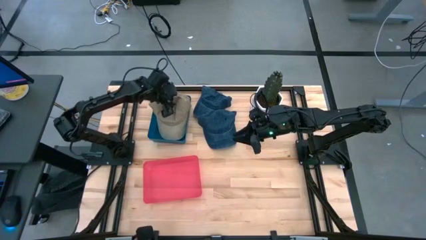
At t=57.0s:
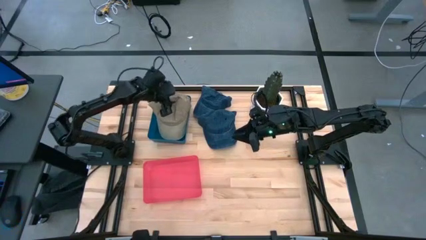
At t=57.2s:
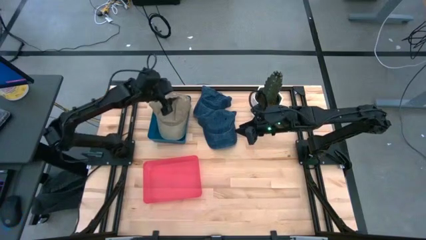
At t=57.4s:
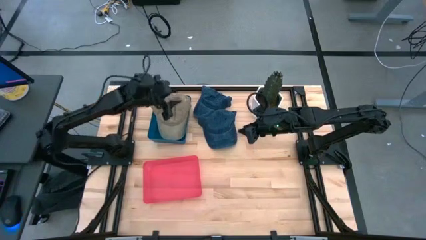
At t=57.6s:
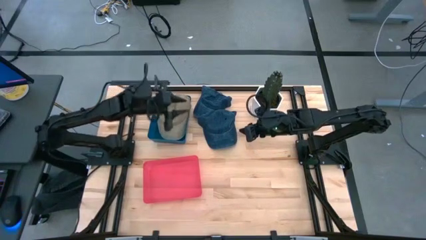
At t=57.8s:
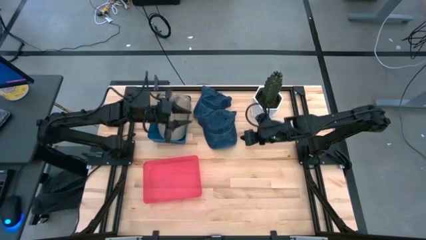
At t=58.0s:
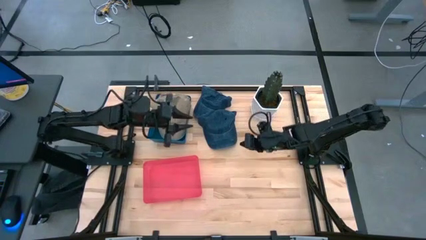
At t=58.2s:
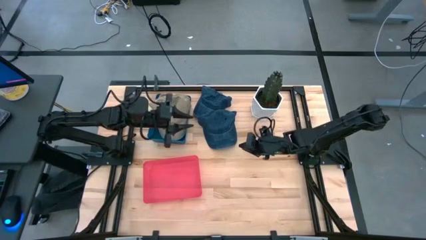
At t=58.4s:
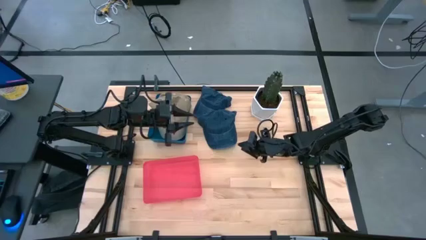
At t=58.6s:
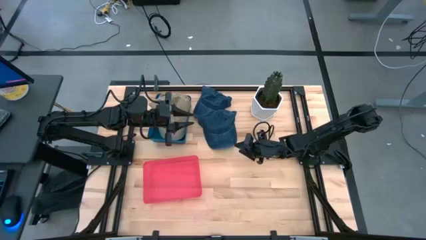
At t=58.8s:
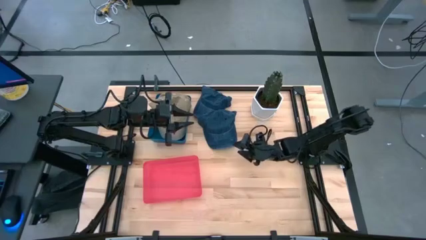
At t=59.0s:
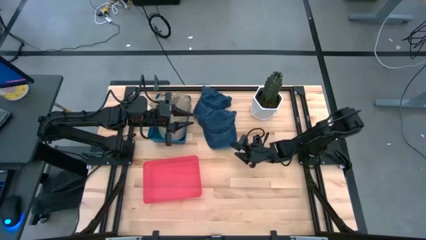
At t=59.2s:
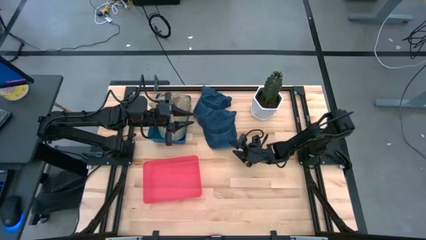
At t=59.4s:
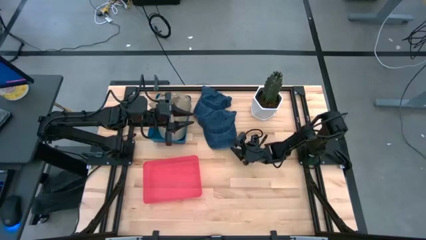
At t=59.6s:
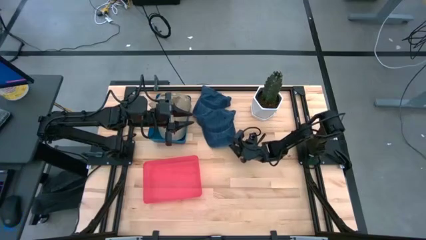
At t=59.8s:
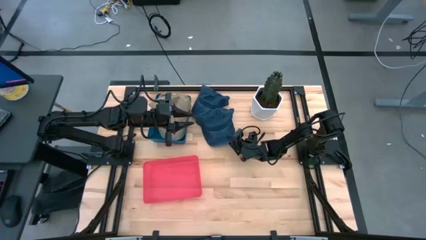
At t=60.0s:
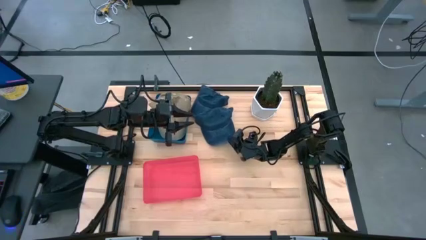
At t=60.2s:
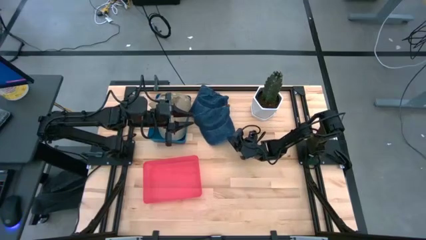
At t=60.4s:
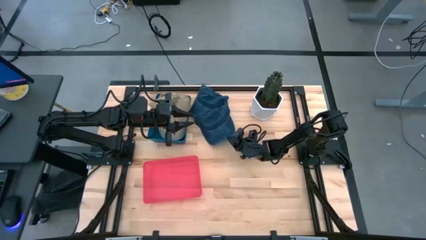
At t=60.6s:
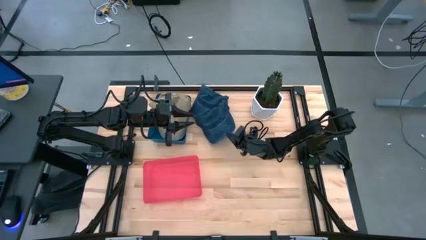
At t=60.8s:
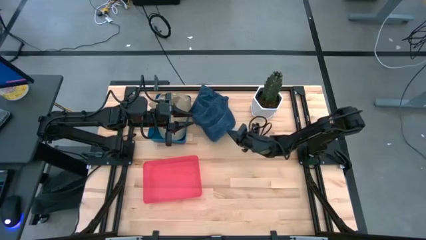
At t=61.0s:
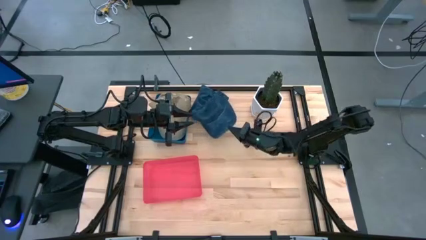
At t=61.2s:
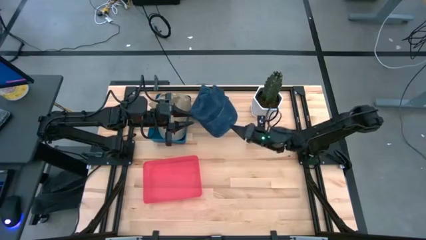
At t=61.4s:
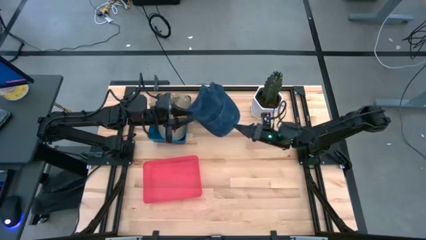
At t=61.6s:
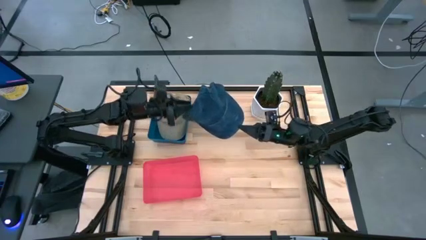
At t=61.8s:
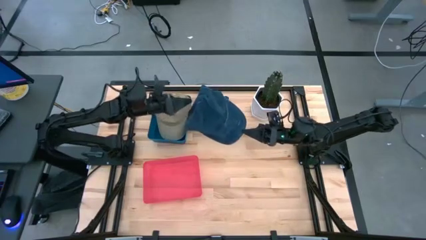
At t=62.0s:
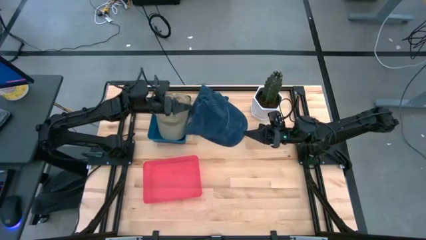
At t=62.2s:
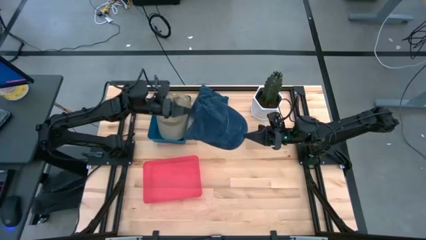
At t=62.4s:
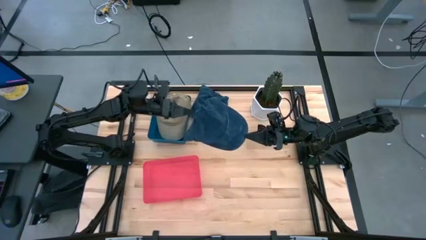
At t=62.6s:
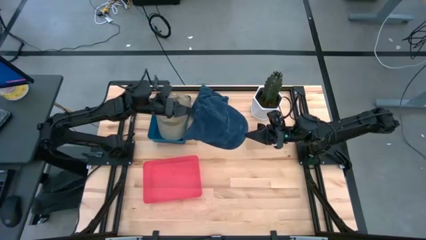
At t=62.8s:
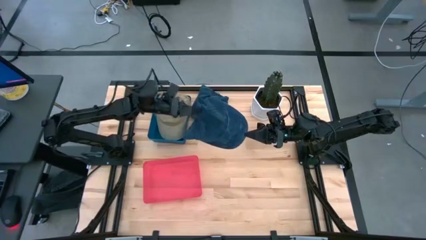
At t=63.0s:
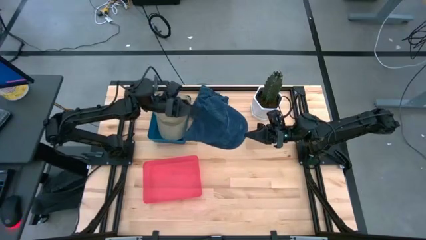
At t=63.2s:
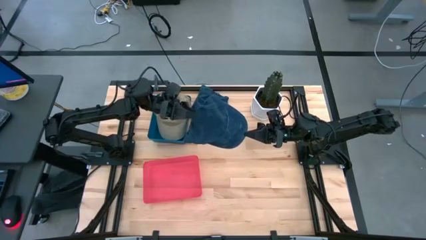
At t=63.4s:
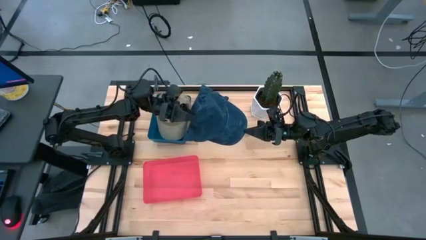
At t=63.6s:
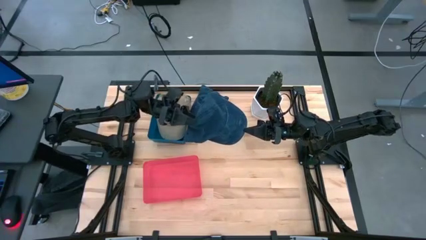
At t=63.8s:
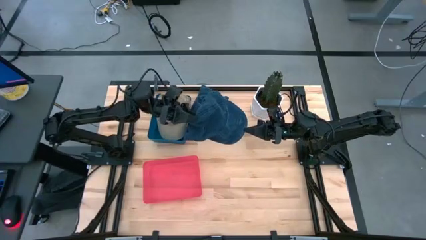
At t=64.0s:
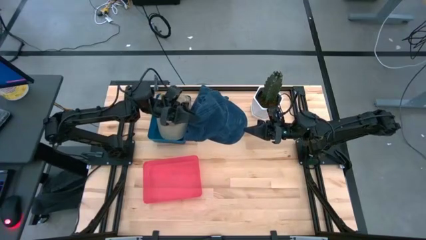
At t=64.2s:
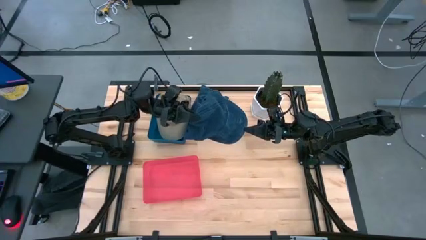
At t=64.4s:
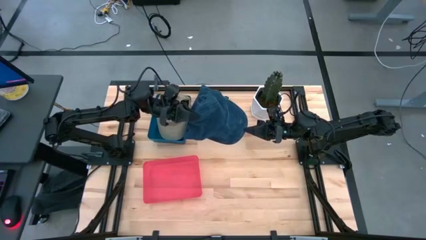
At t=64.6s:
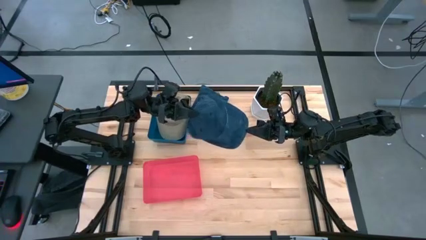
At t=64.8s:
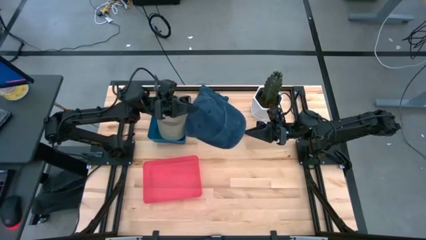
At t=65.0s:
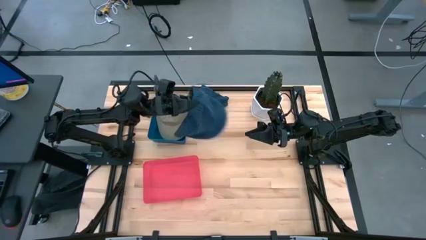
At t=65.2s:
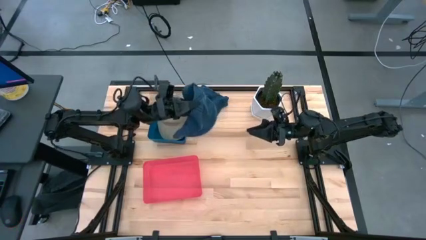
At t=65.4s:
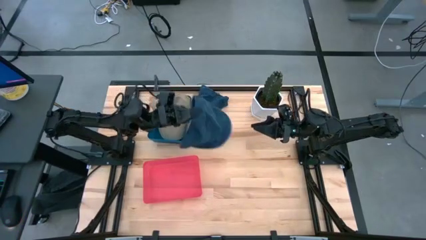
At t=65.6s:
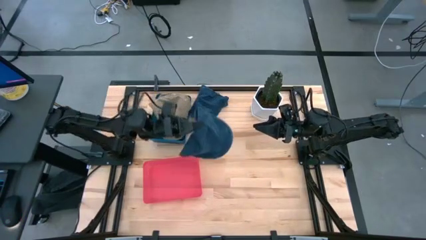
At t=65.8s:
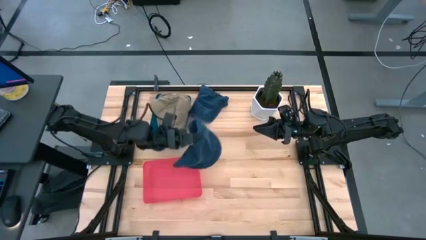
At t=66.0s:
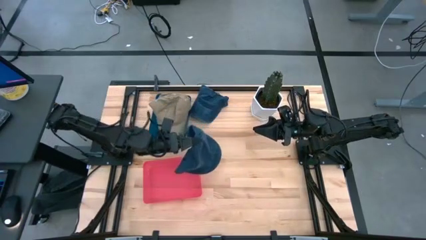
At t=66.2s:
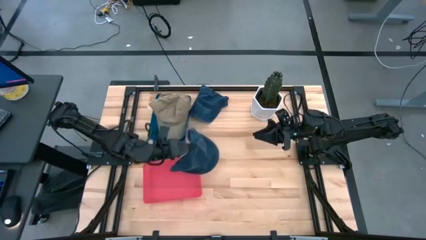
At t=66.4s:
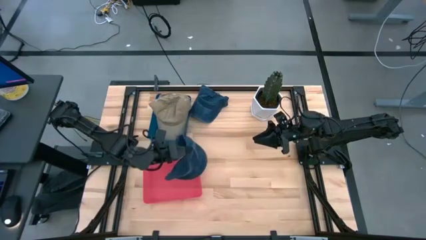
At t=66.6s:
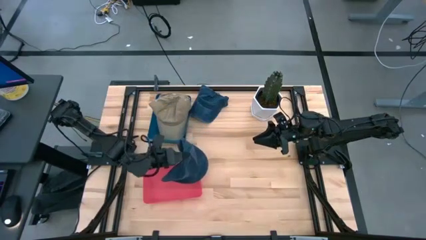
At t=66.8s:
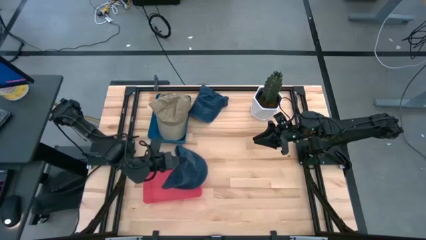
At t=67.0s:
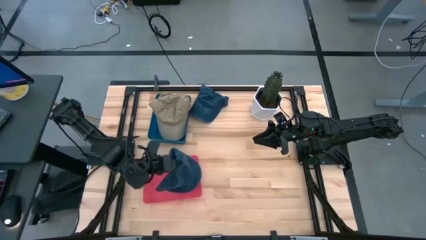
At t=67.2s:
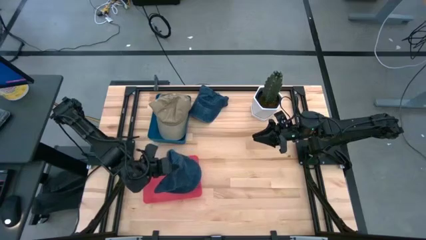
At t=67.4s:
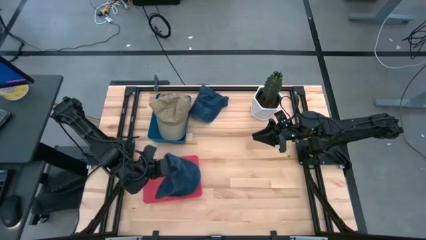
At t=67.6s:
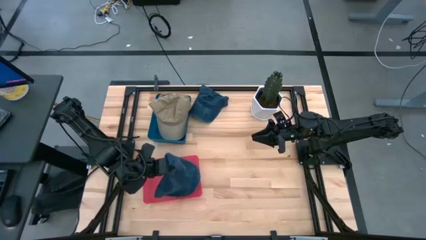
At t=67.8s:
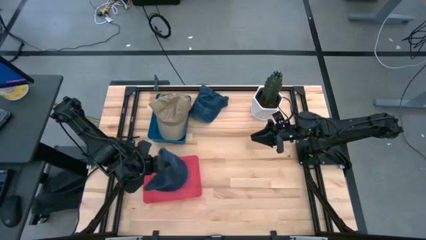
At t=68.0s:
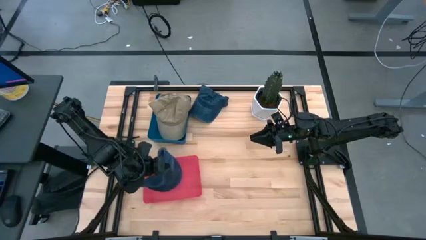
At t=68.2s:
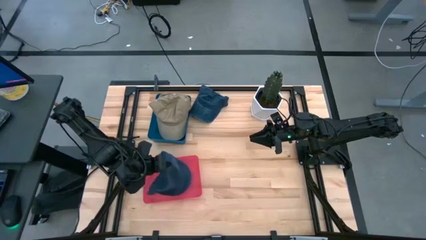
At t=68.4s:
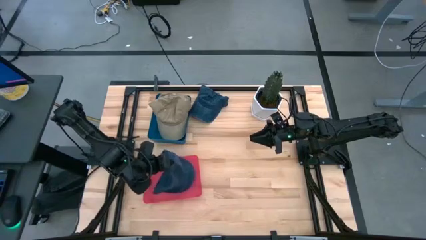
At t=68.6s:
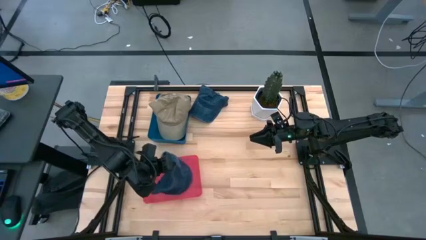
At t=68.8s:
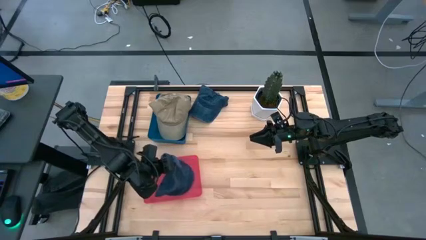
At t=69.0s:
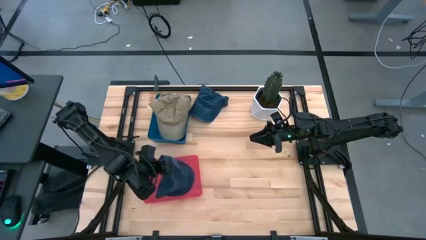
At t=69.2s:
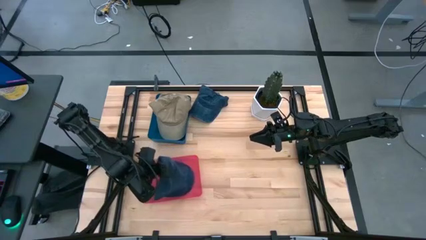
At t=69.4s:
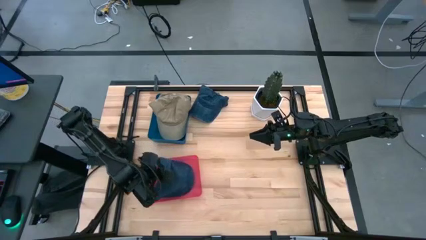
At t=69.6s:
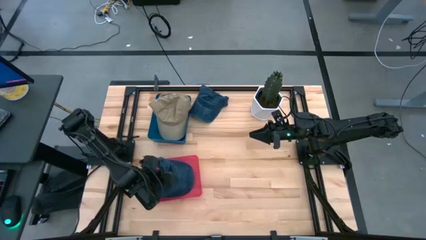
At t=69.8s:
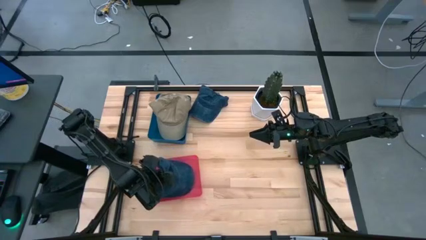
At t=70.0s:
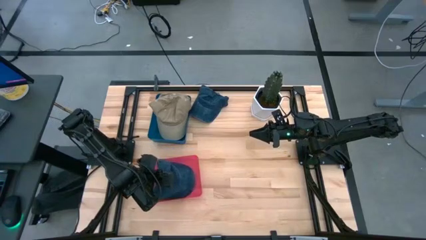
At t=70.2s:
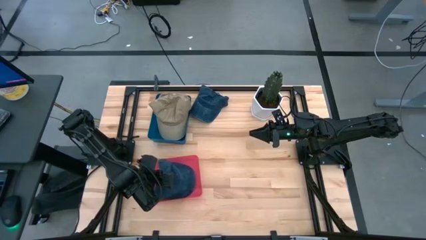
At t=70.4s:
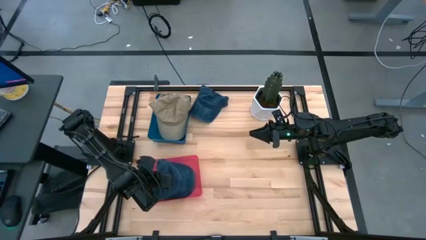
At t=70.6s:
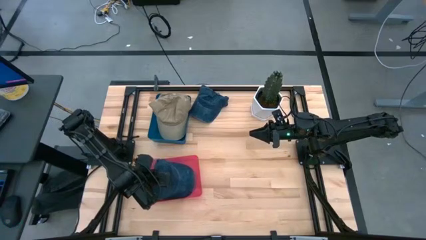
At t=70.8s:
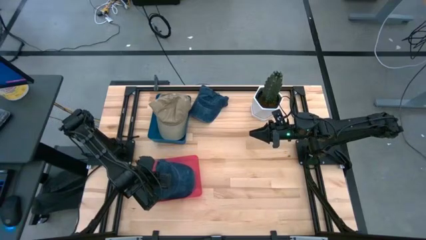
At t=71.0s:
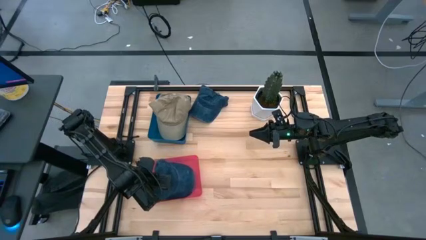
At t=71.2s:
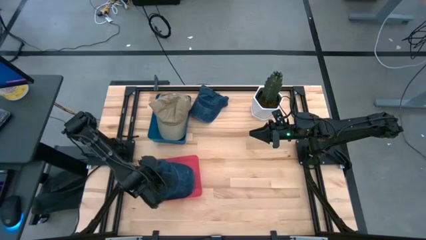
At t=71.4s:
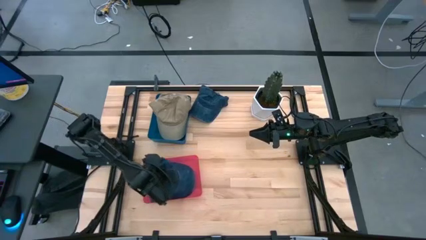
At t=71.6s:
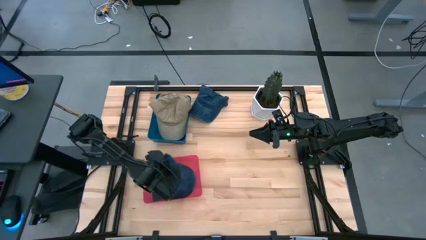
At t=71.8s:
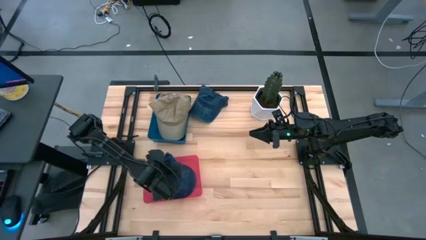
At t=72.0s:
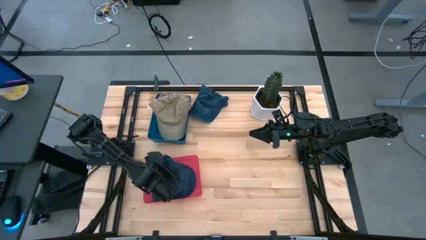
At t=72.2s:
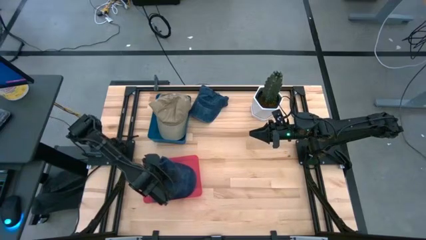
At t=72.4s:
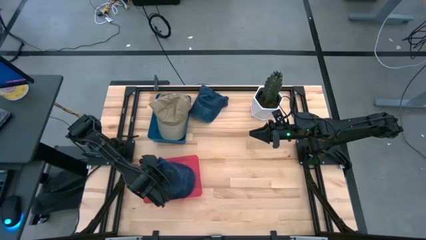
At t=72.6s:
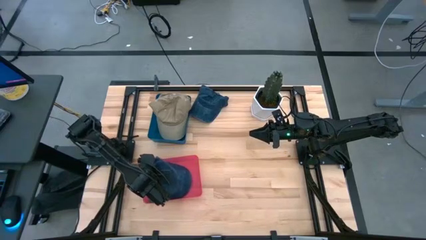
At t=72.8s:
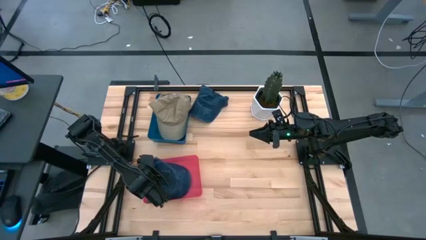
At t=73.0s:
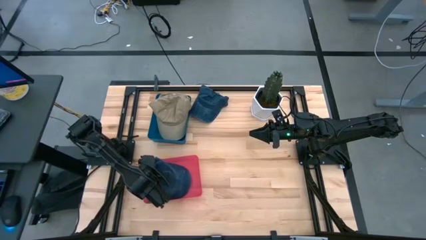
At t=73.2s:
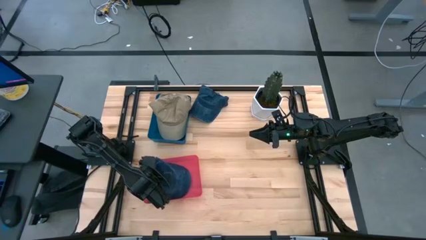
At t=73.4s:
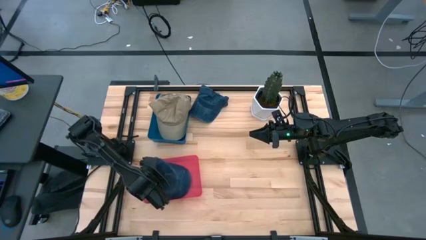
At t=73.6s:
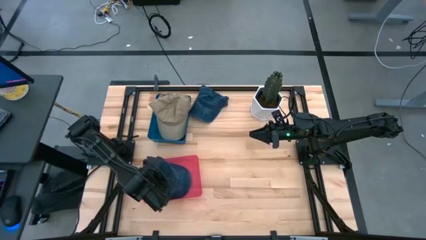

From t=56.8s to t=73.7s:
Task: Pick & Place hat
Put the bottom blue cap into the pink bin
